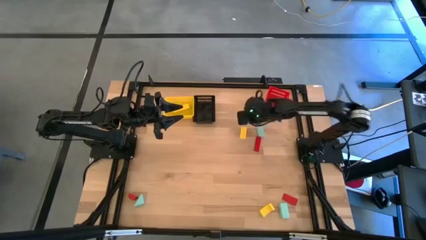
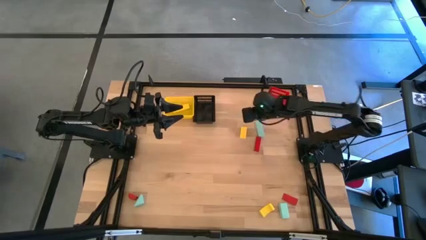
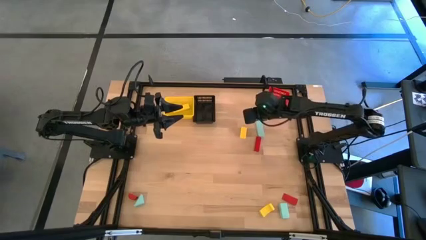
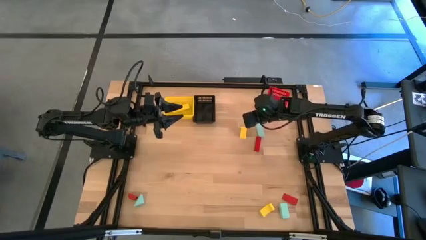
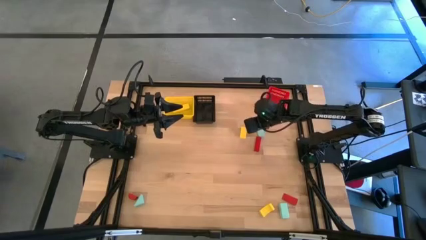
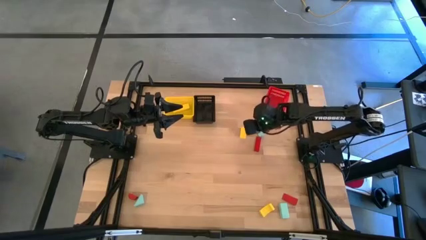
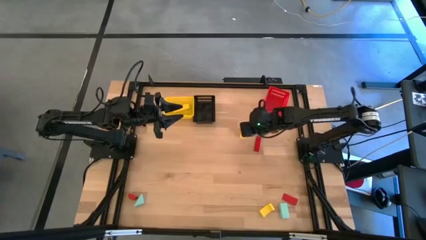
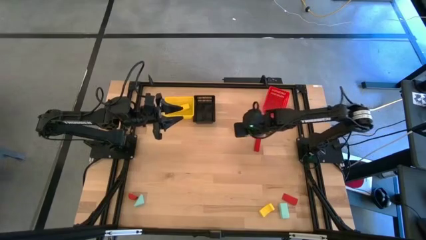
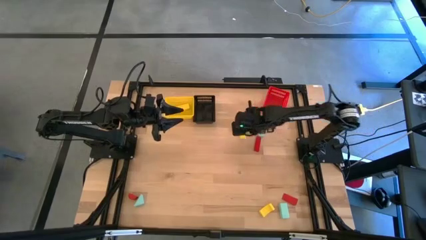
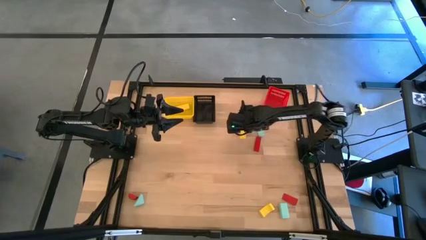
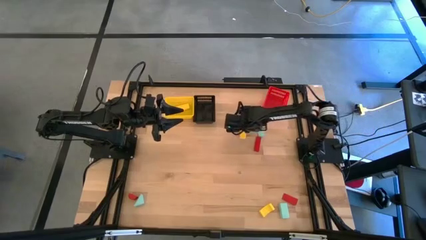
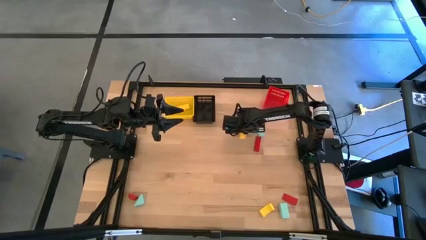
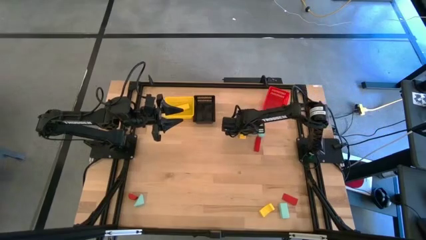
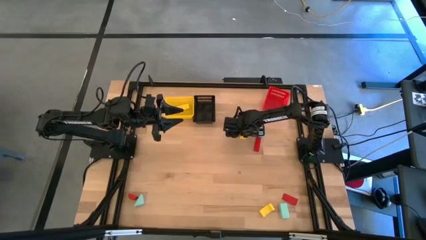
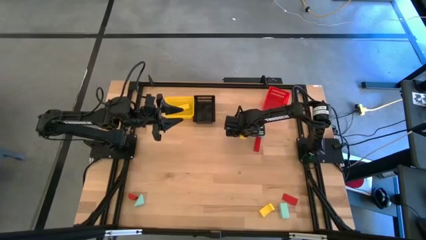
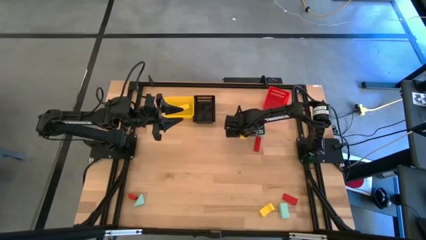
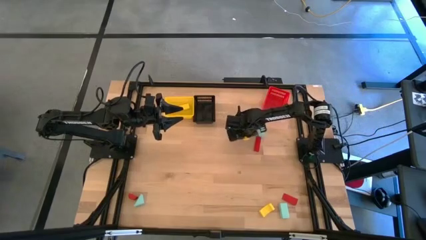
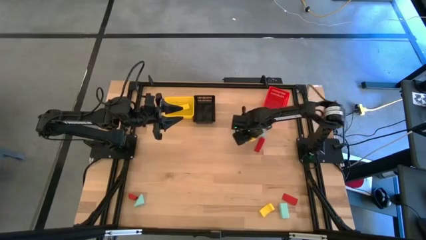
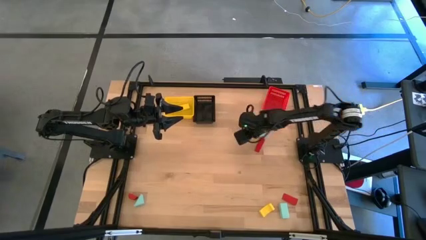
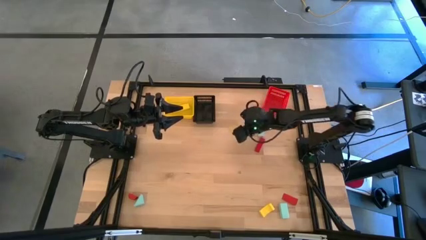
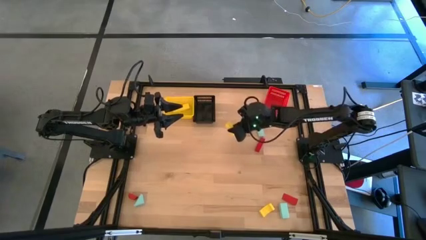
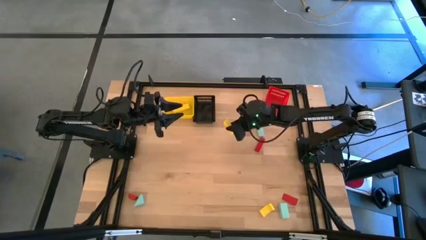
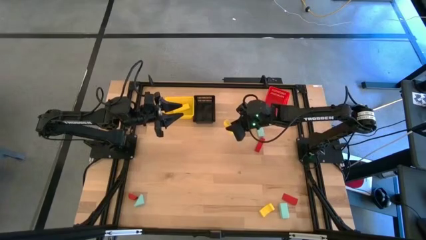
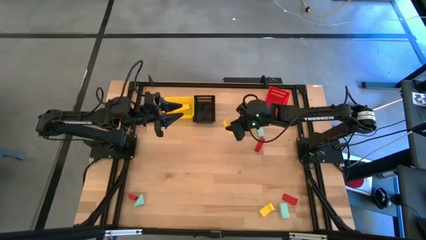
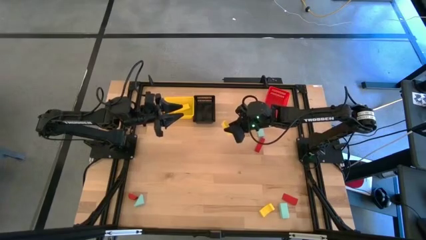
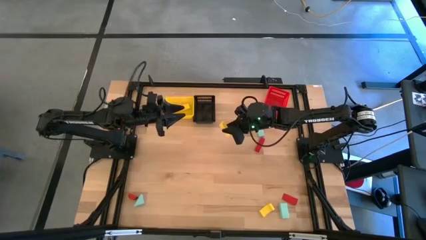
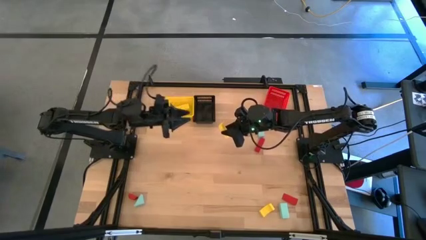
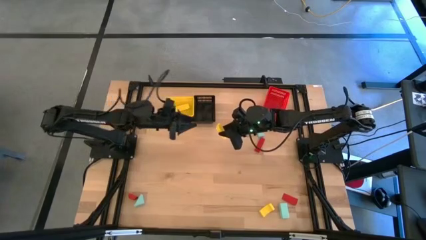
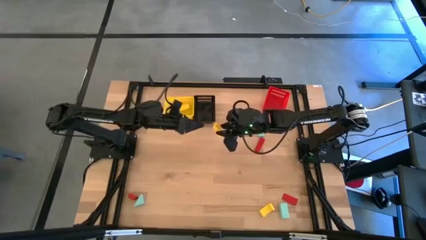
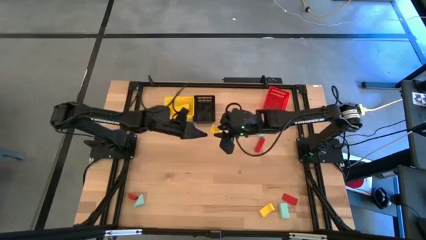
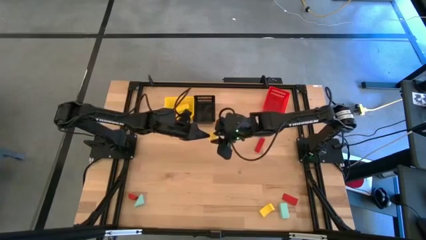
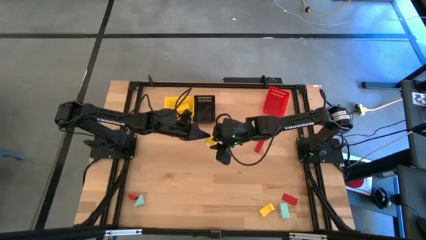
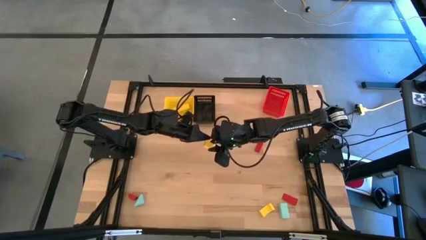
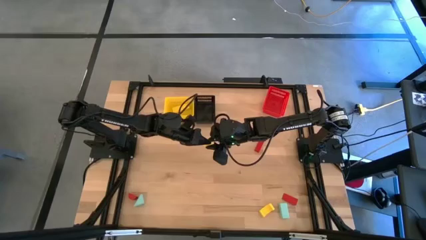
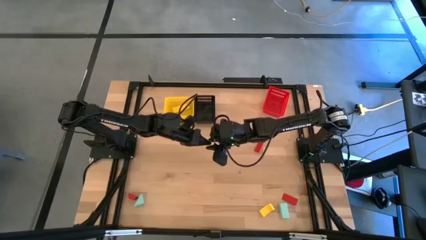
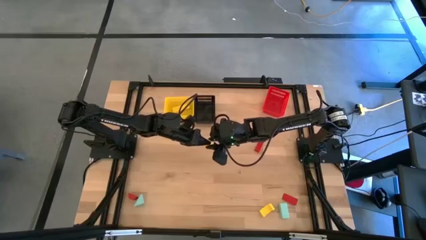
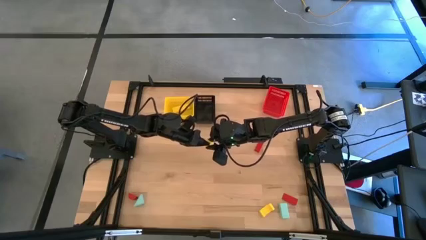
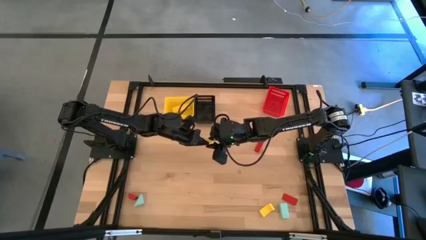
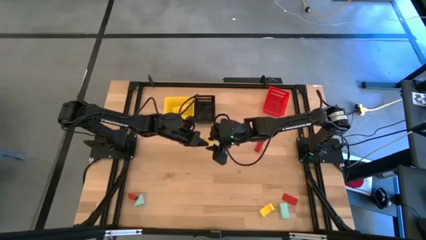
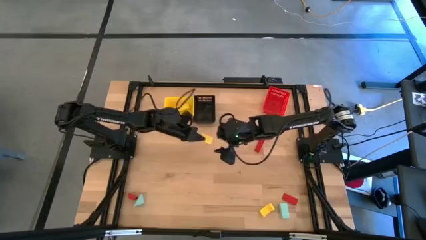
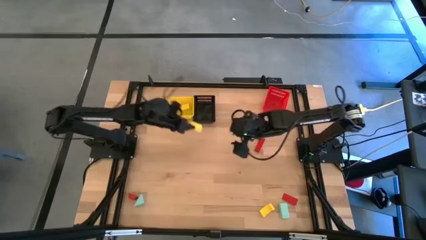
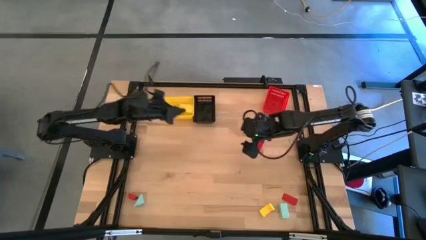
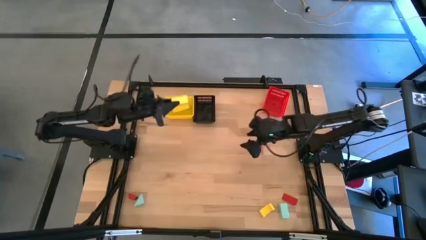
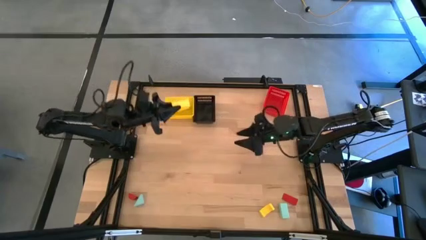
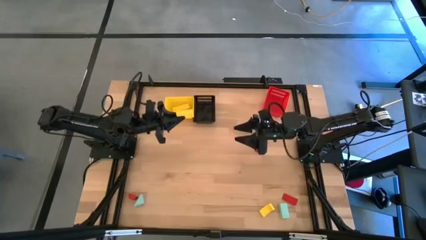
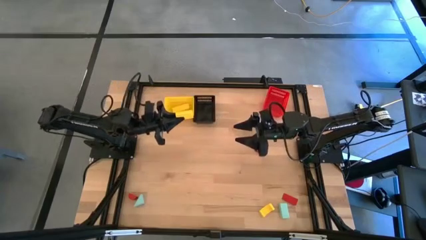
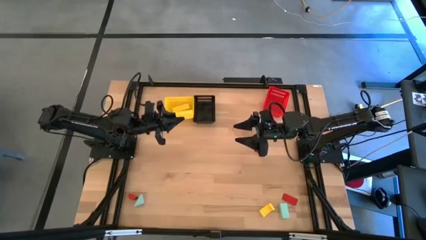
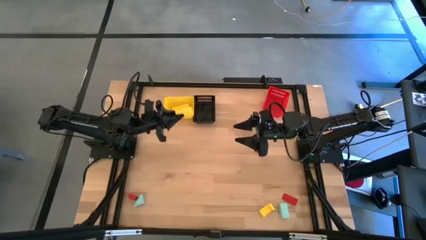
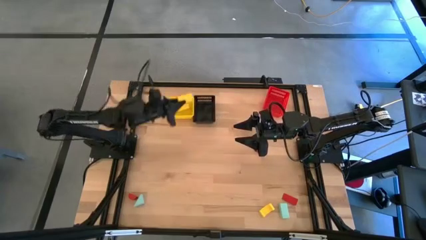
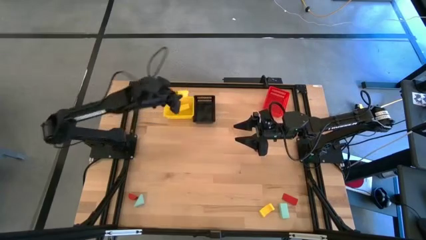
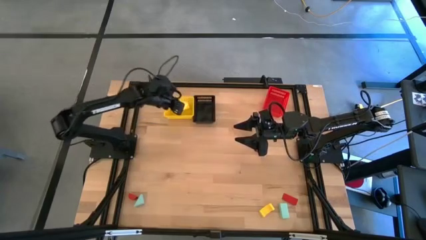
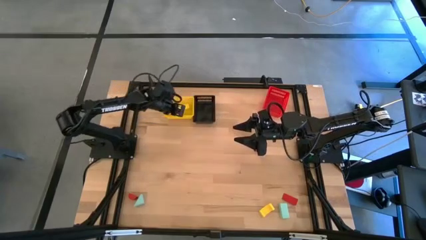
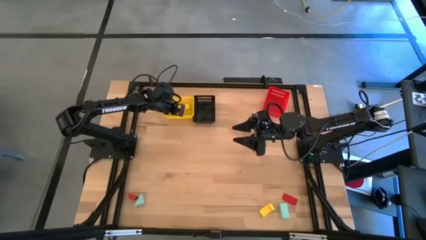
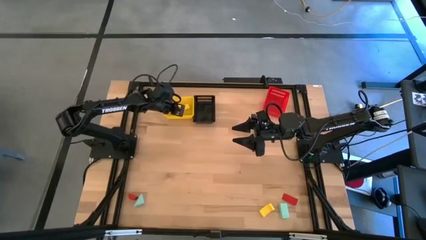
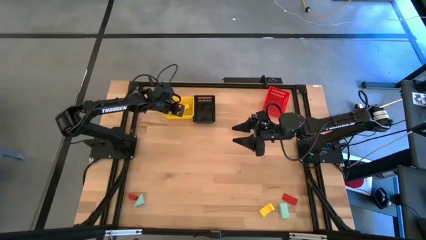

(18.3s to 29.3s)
Task: Sort & place blocks by color
Put the top yellow block into the yellow bin

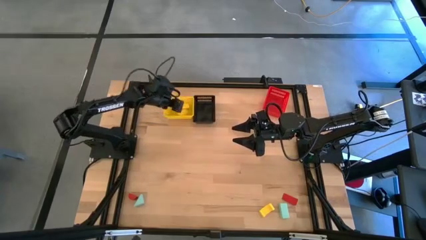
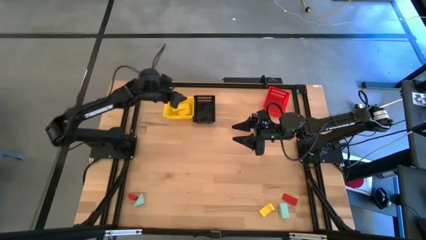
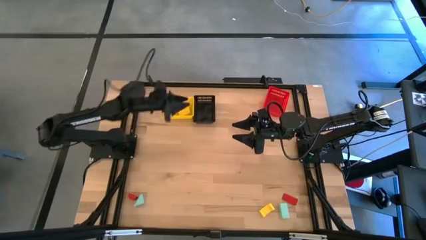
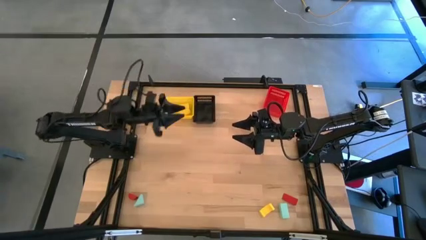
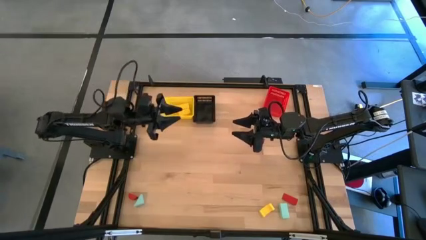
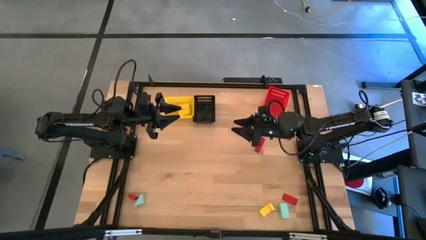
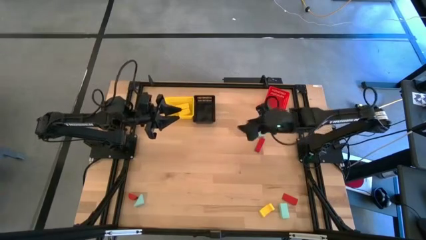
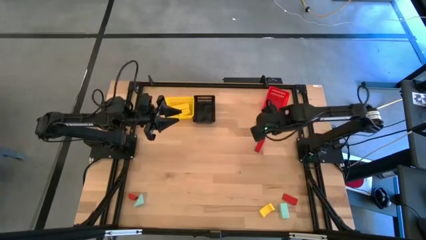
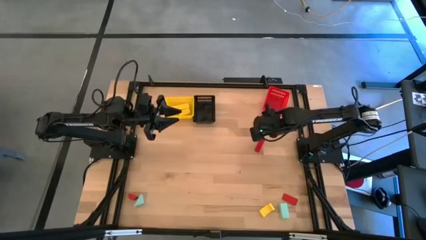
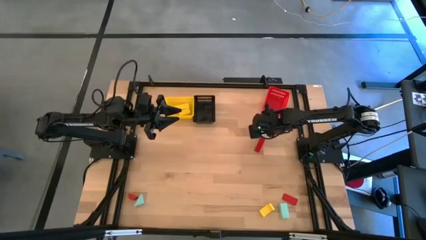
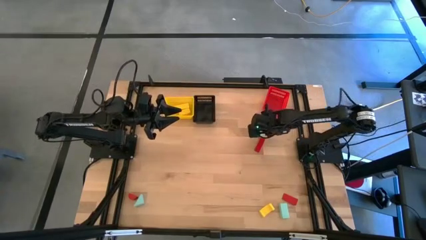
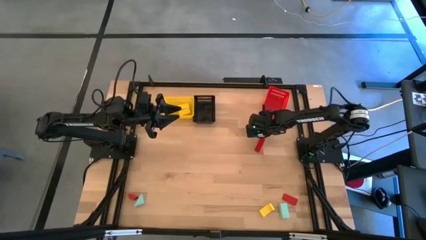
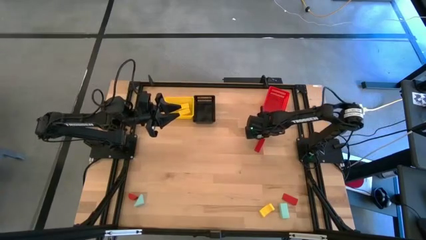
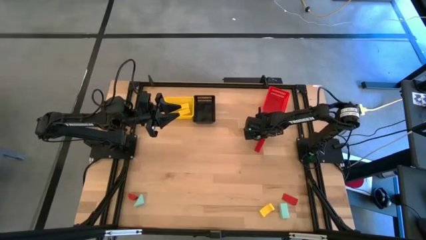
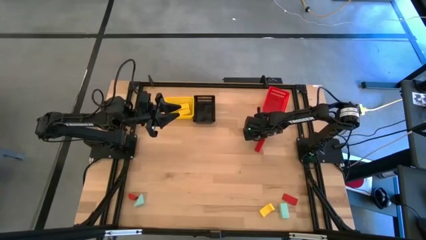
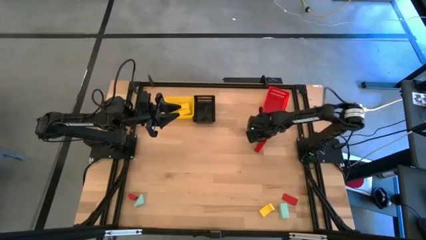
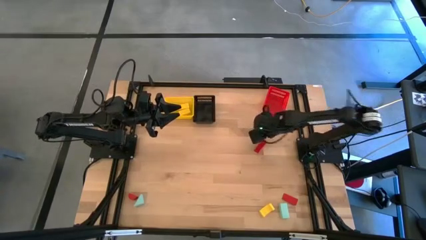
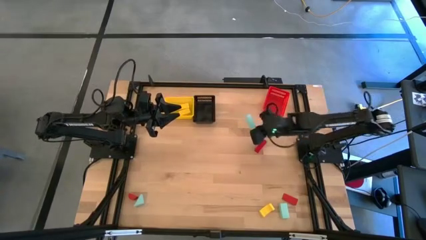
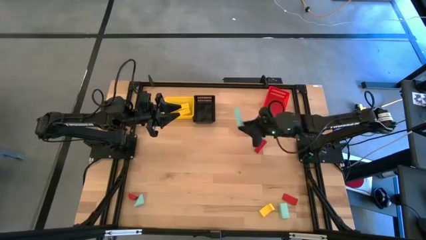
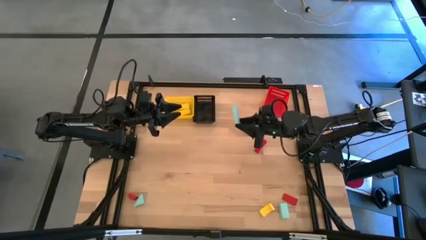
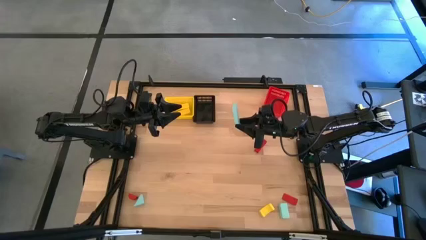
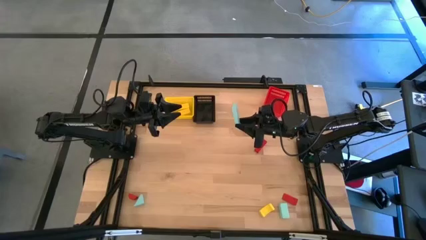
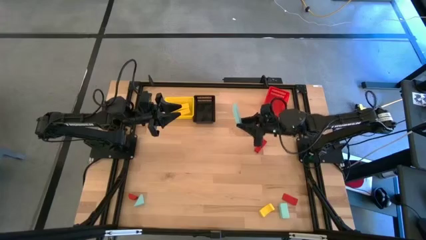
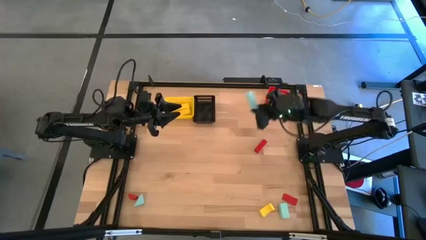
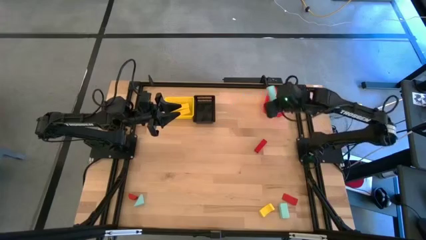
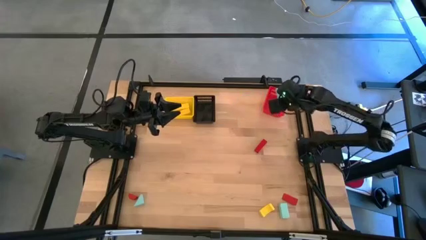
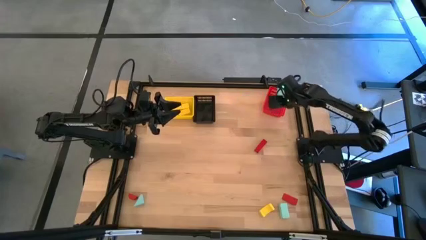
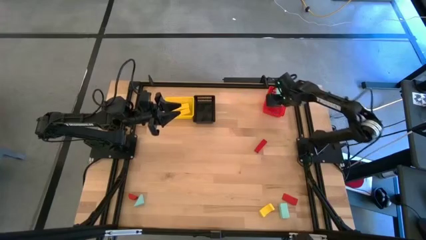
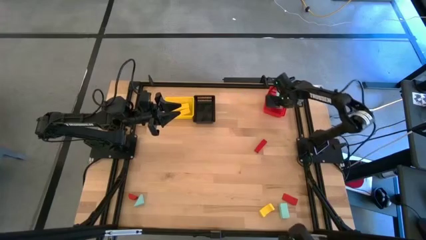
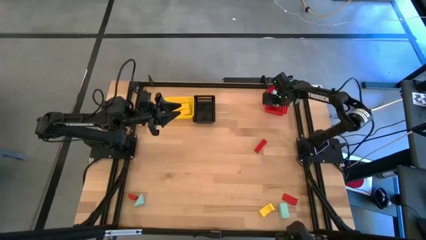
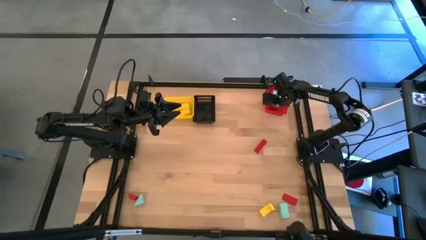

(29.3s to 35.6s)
Put the top blue block into the red bin
